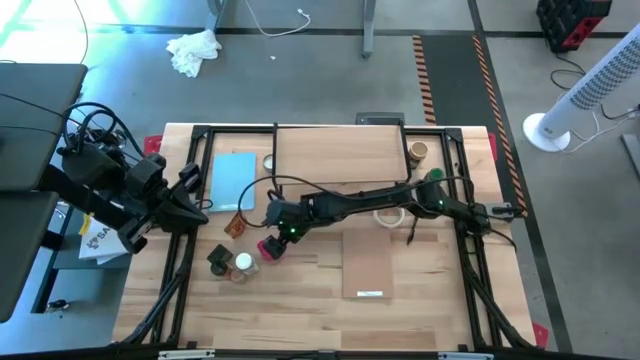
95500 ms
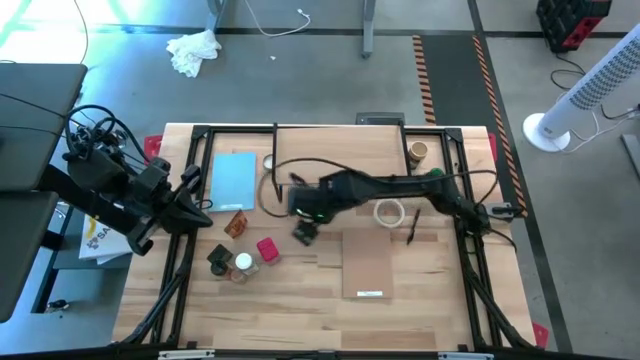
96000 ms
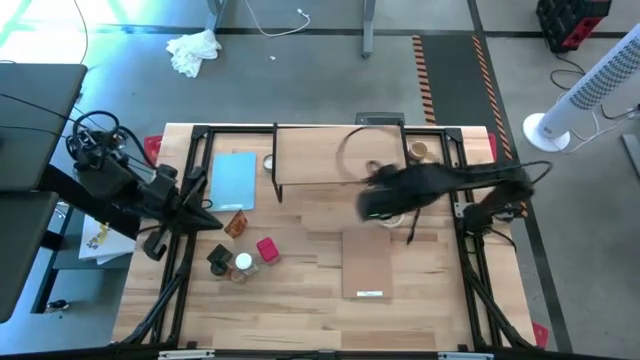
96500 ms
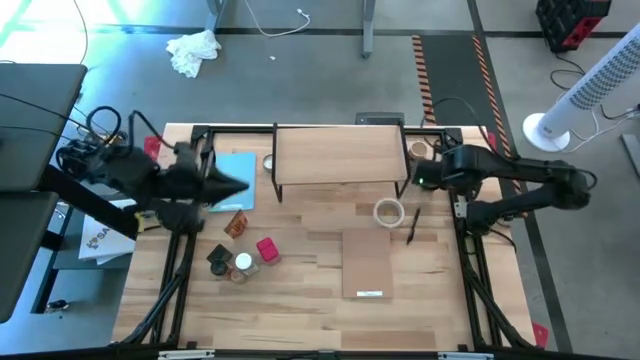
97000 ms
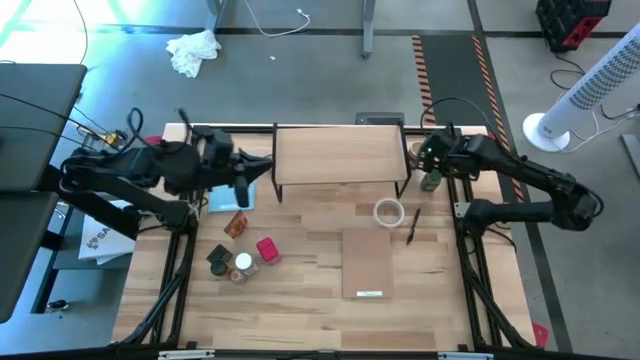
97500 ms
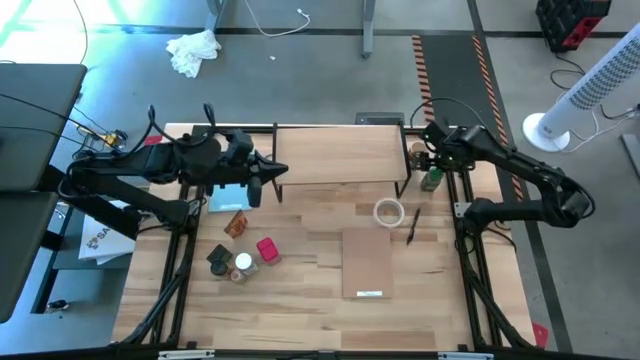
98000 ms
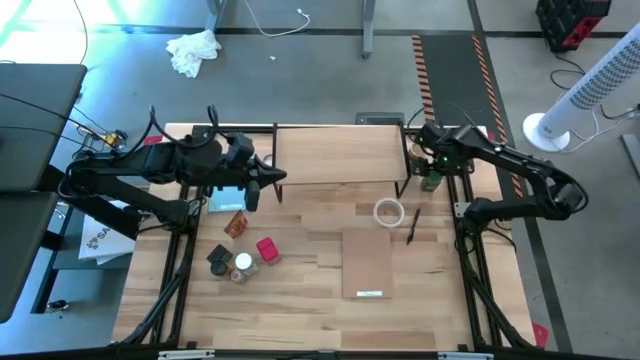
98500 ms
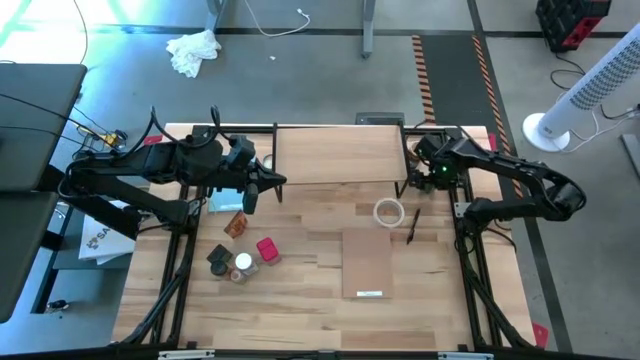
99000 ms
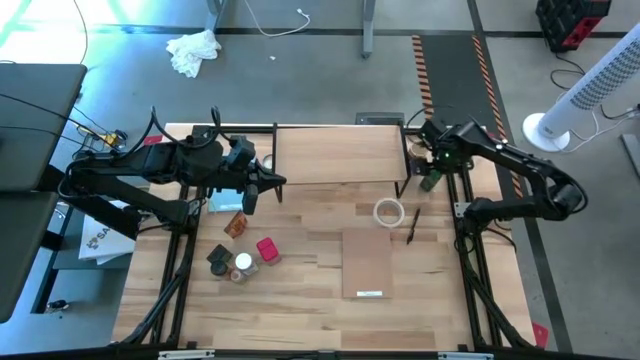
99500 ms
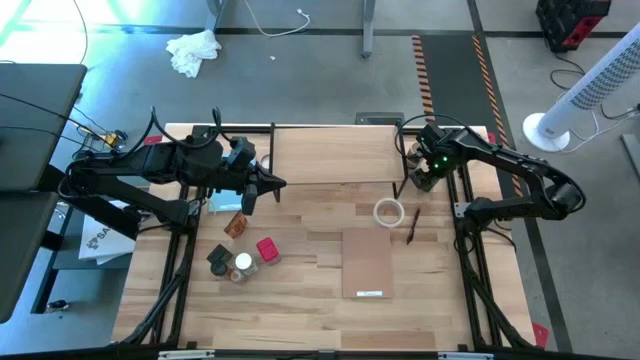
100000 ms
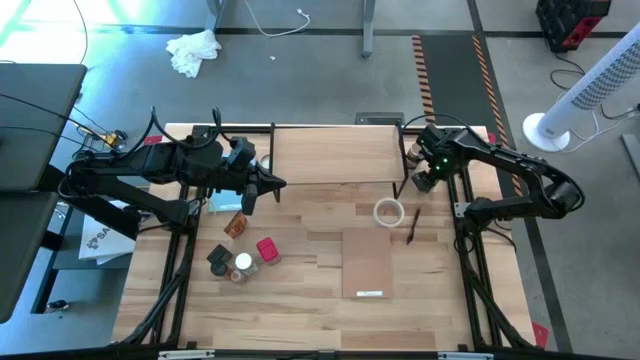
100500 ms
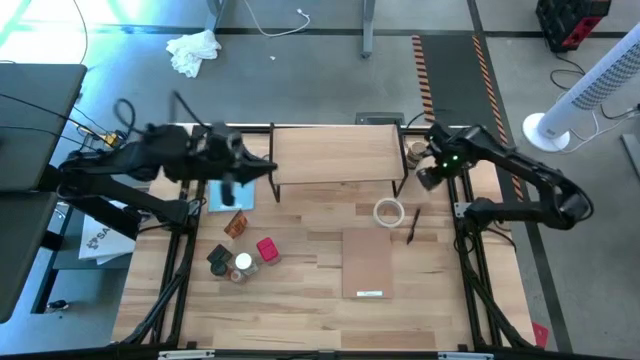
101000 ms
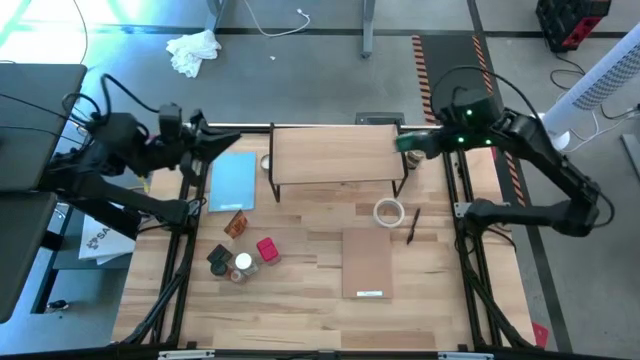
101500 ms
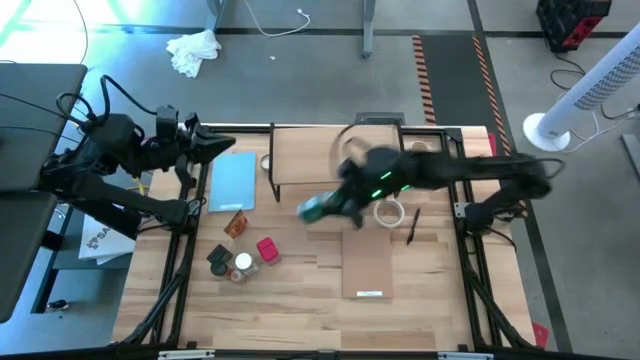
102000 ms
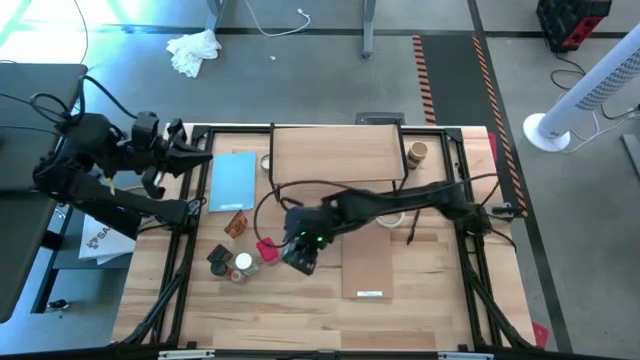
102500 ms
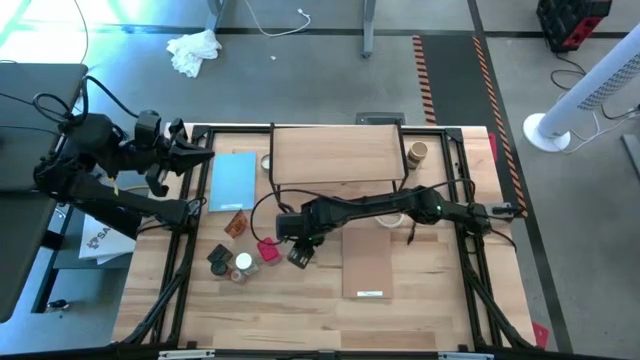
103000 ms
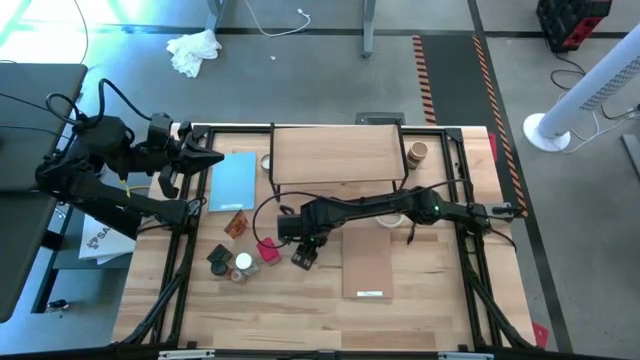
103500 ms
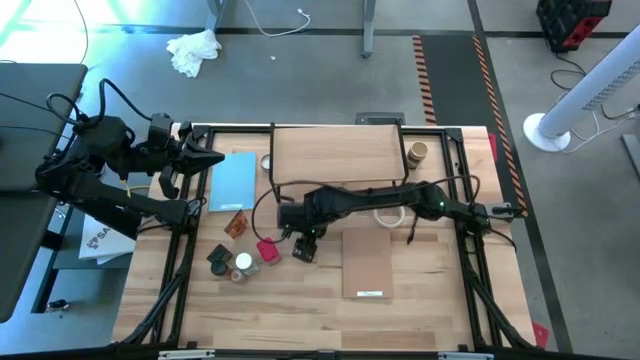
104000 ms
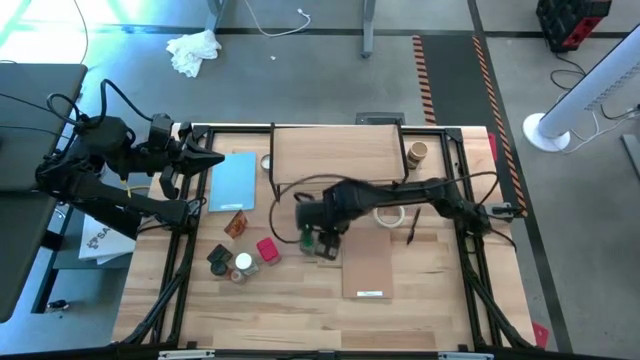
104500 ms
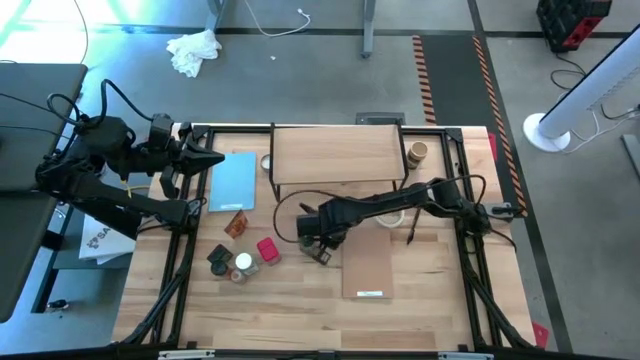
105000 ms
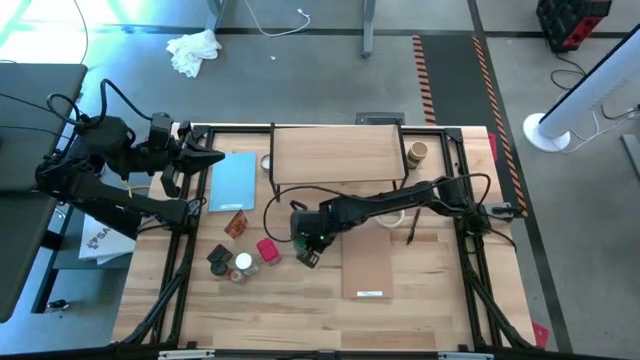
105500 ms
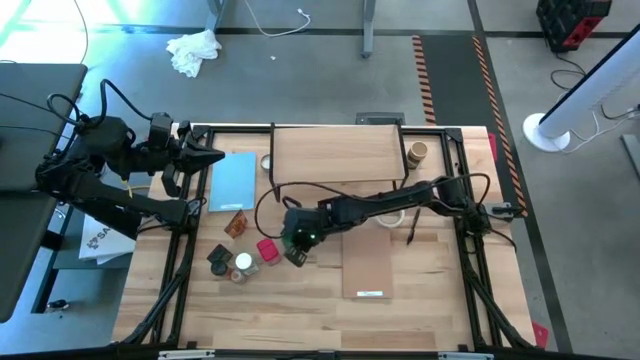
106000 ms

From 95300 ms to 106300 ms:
Task: Shelf spices
Move the green seasoning bottle to the middle left of the table

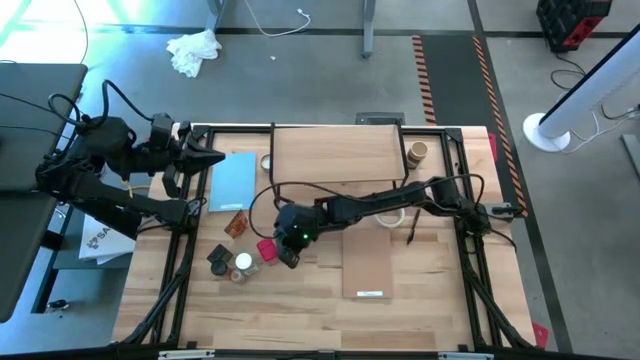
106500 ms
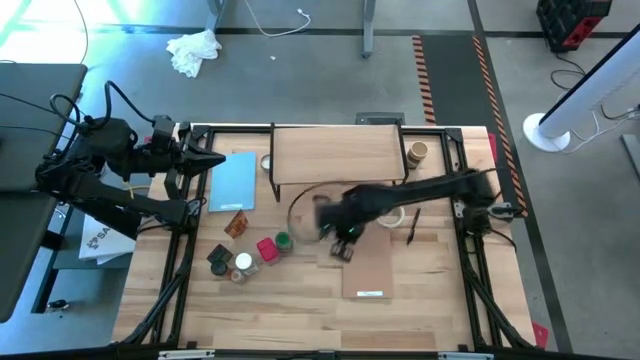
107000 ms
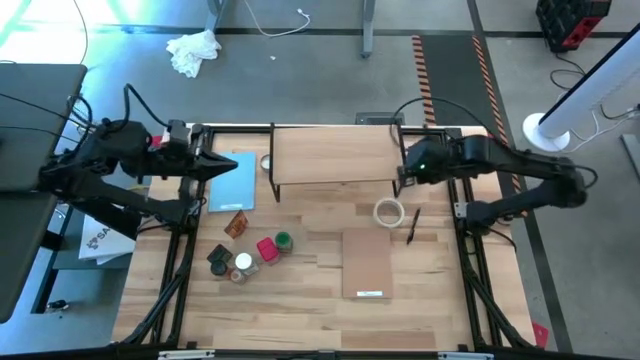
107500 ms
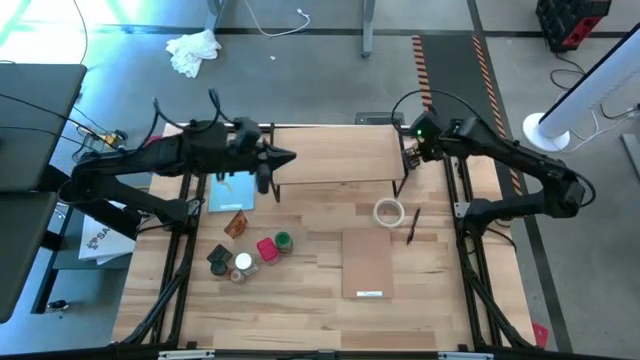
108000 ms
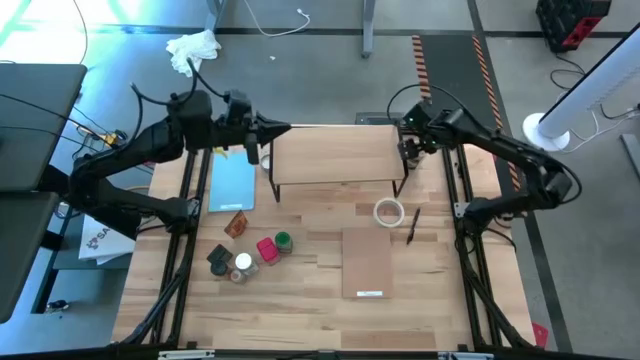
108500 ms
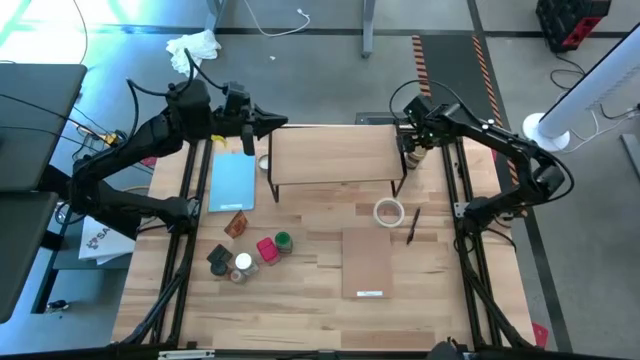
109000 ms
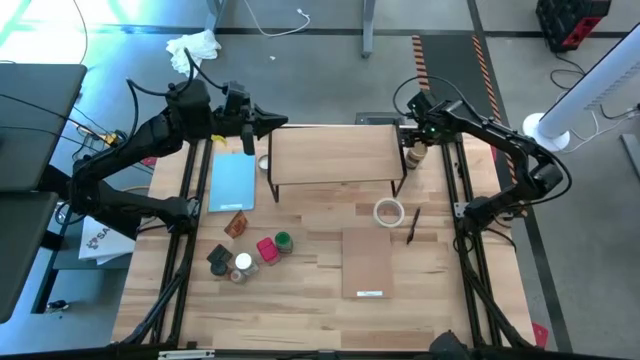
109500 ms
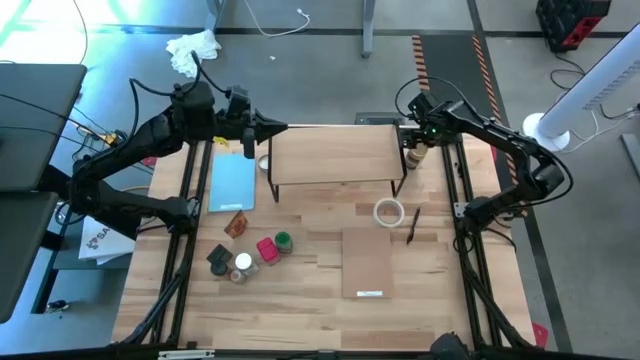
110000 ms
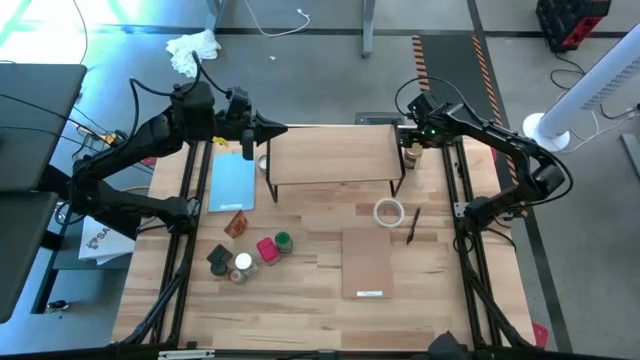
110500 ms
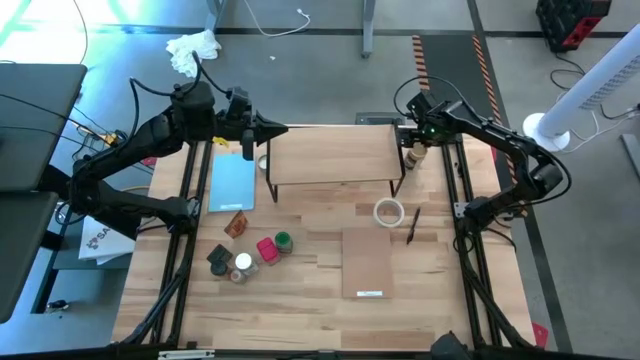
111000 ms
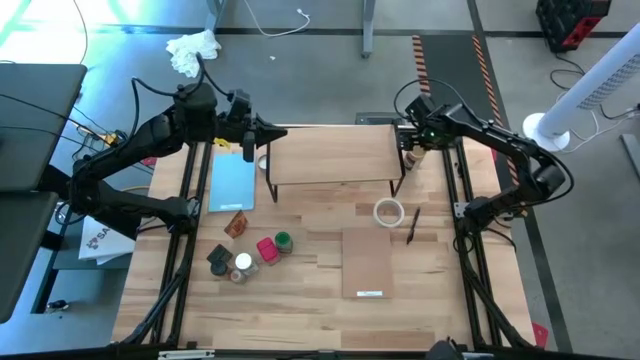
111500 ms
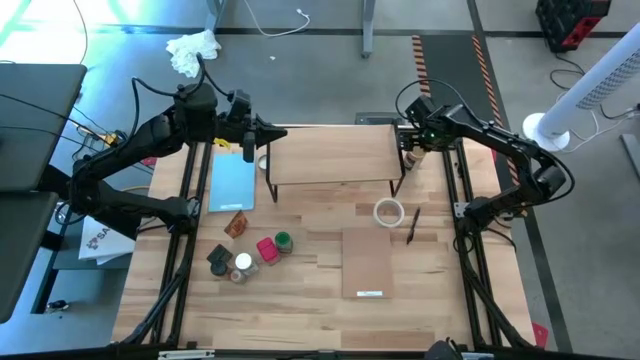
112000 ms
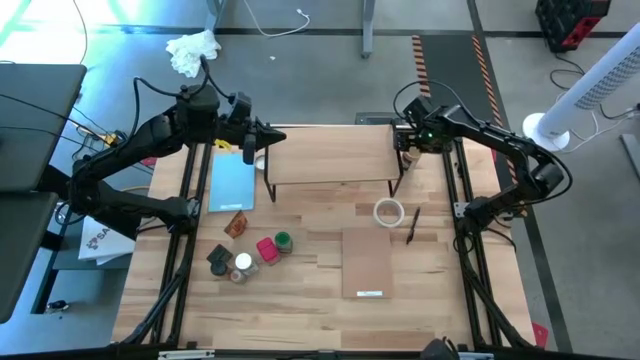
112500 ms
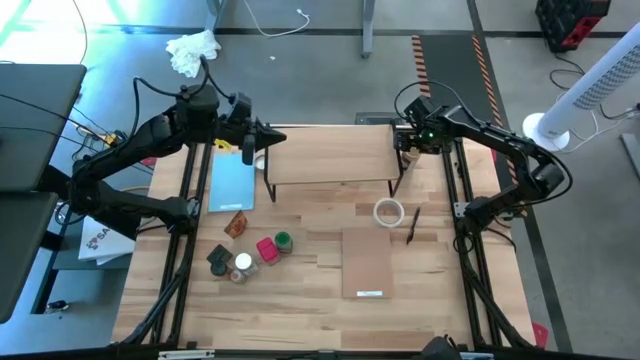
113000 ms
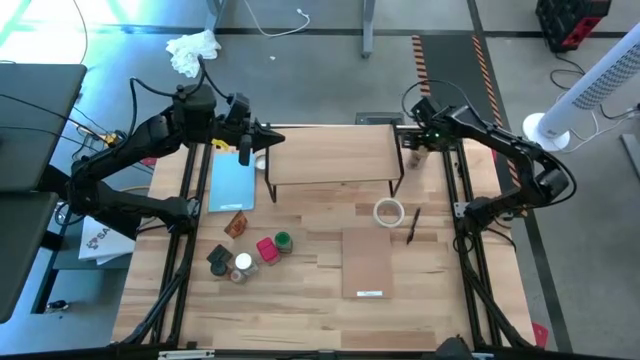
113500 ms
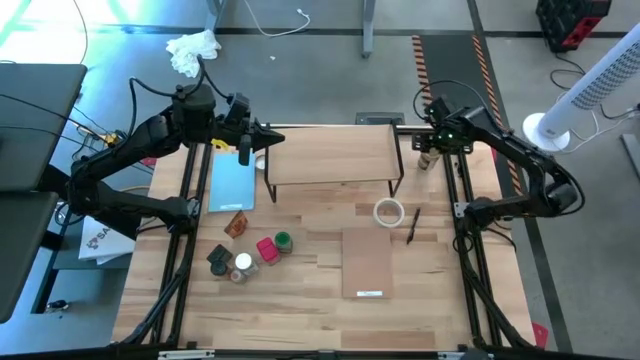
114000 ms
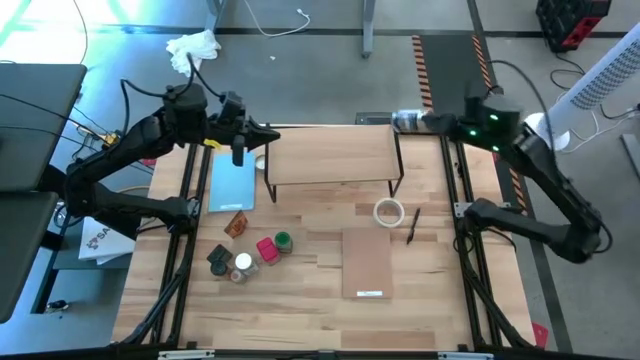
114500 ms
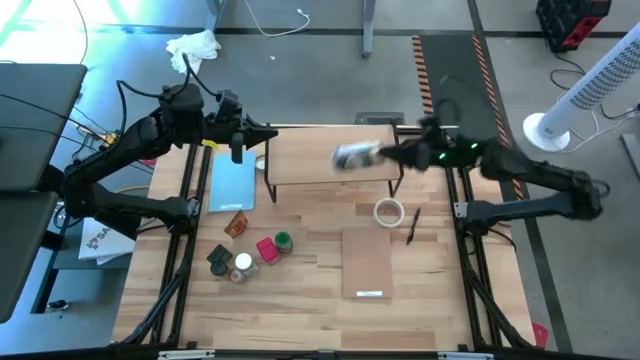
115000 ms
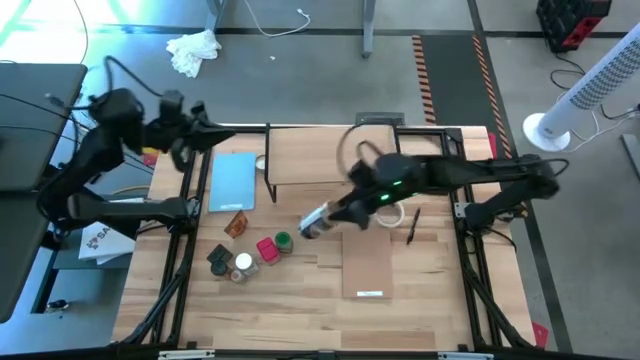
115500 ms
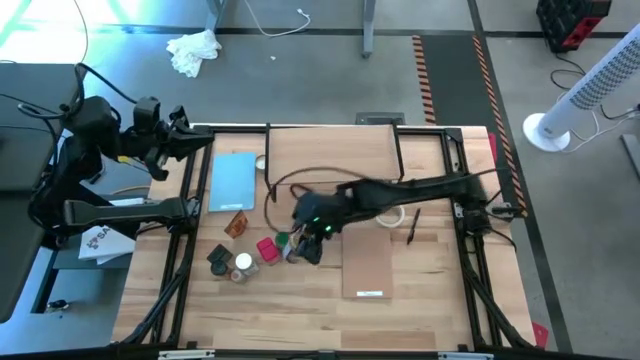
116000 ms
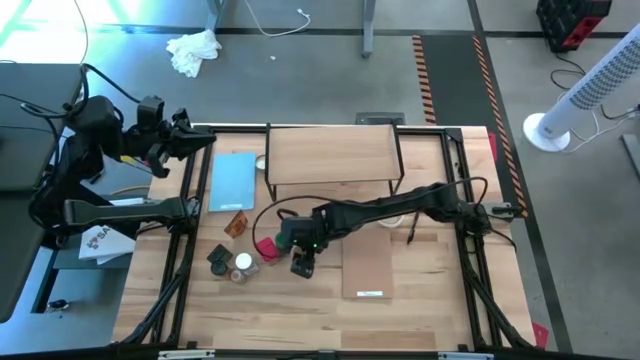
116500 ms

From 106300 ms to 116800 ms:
Move the brown seasoning bottle to the middle left of the table
